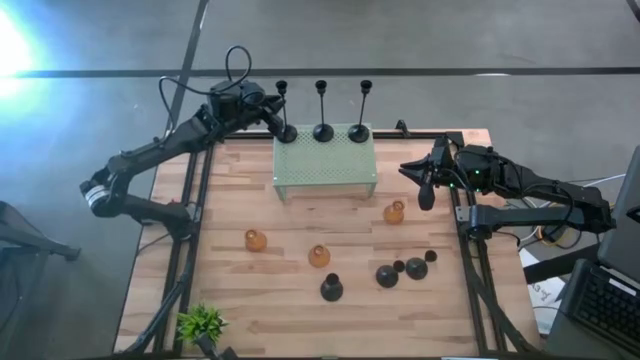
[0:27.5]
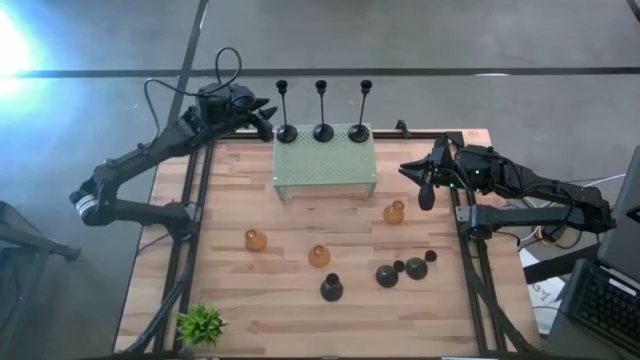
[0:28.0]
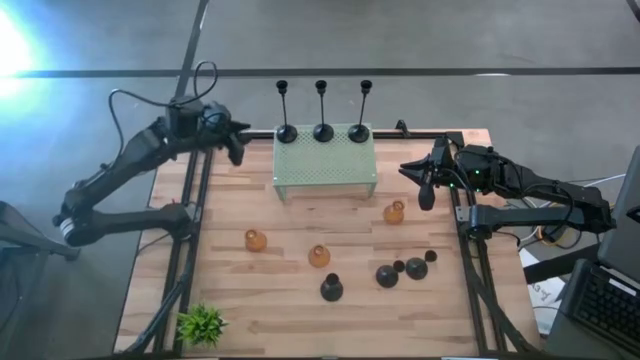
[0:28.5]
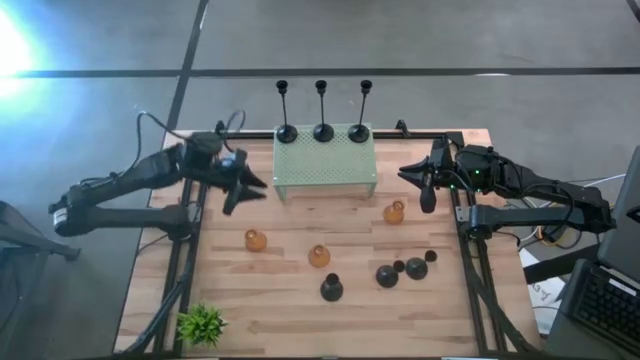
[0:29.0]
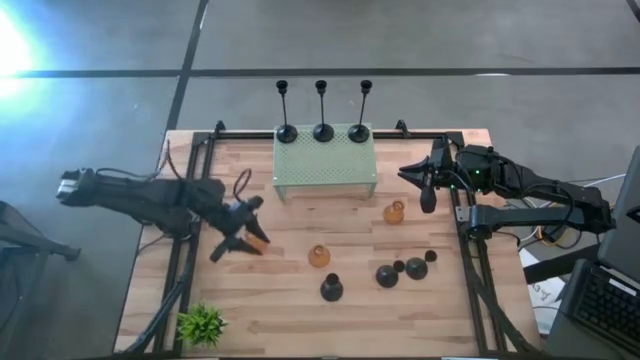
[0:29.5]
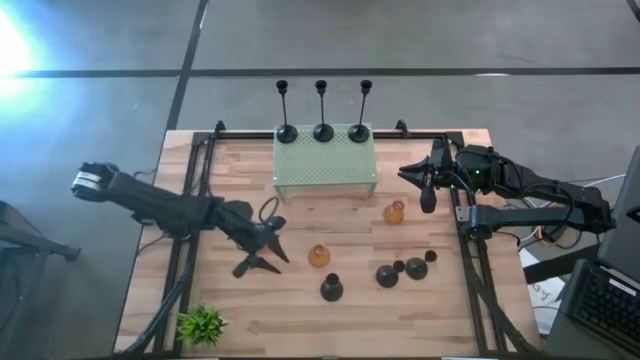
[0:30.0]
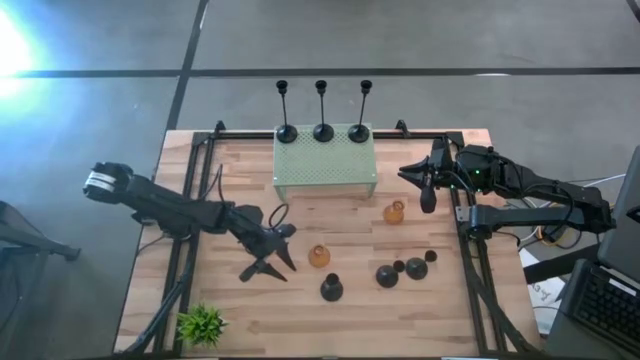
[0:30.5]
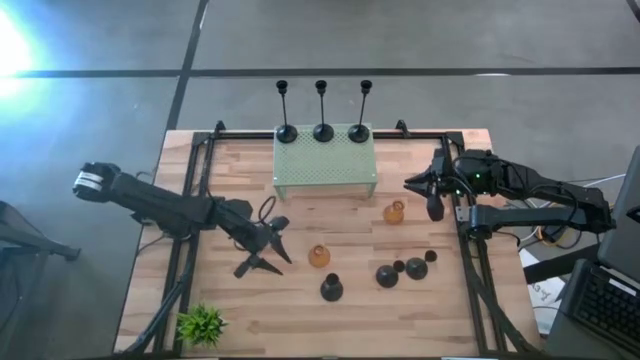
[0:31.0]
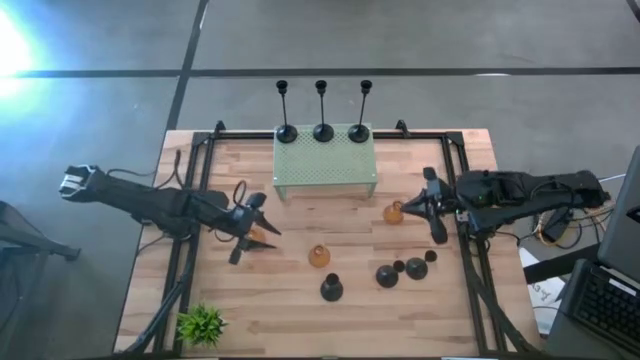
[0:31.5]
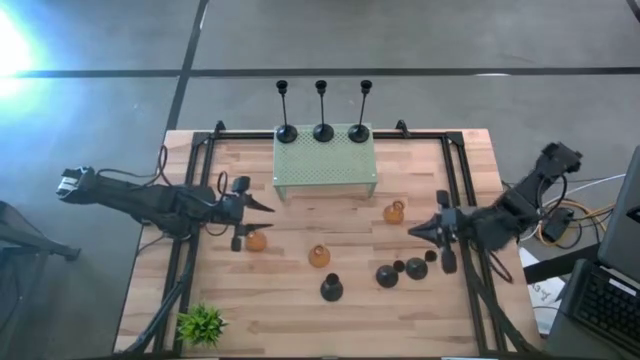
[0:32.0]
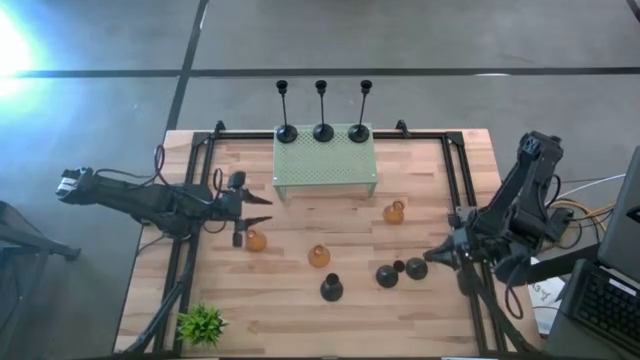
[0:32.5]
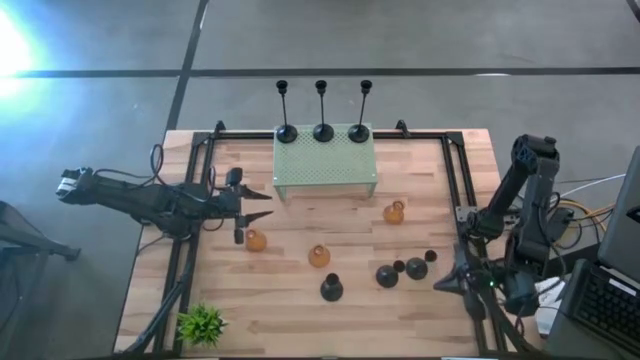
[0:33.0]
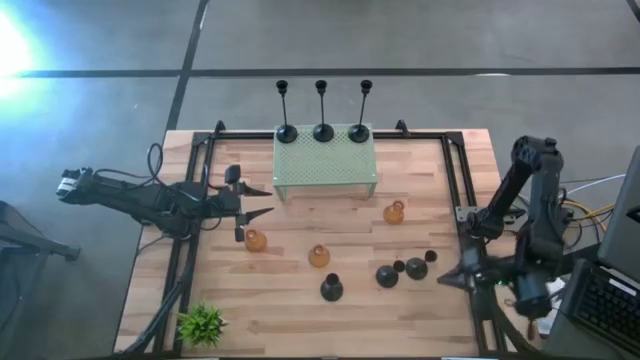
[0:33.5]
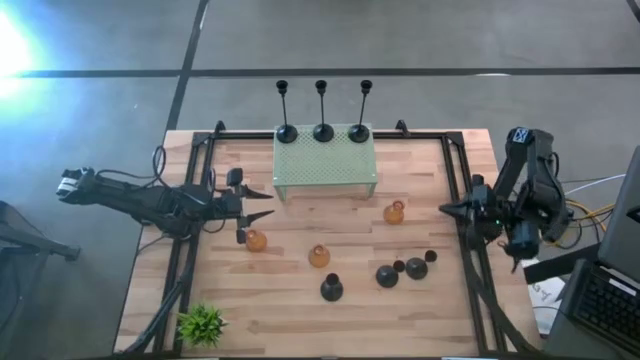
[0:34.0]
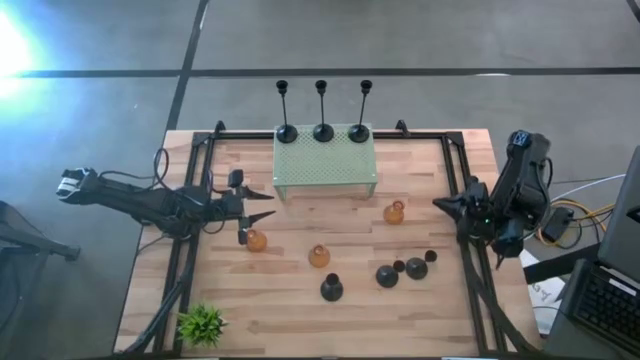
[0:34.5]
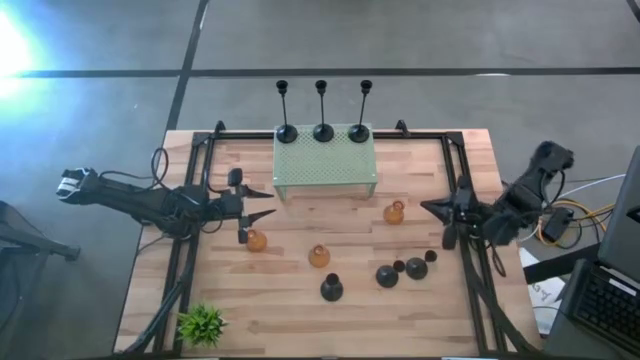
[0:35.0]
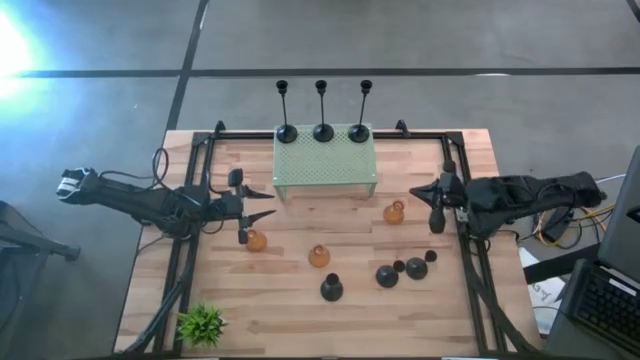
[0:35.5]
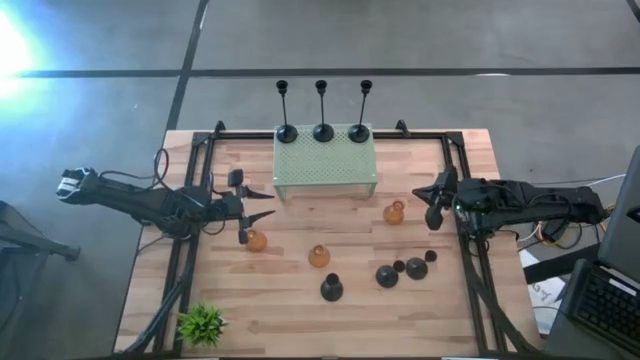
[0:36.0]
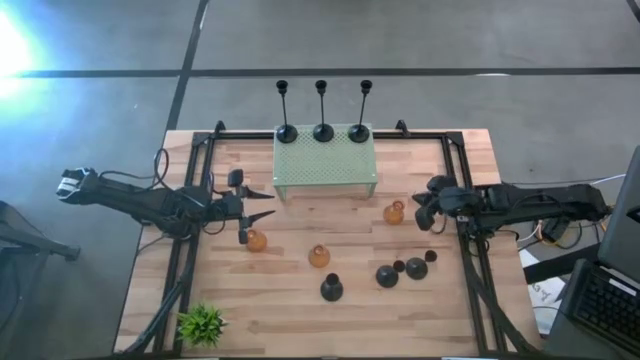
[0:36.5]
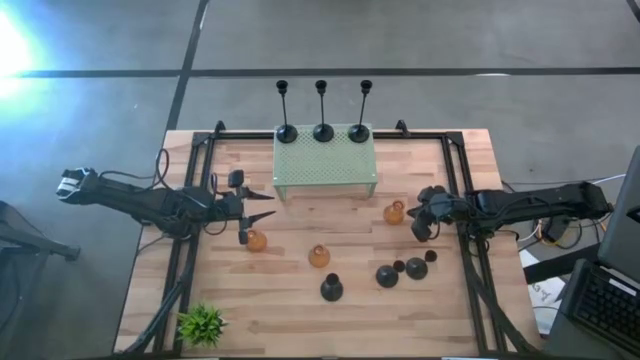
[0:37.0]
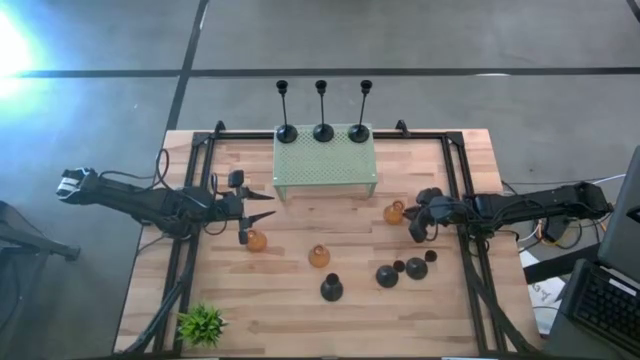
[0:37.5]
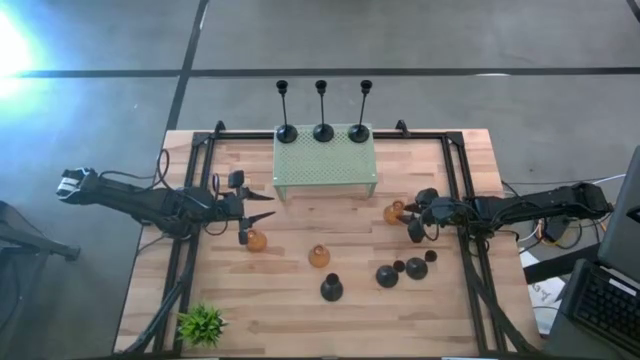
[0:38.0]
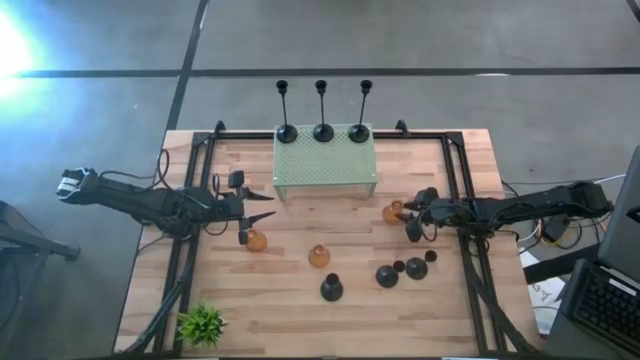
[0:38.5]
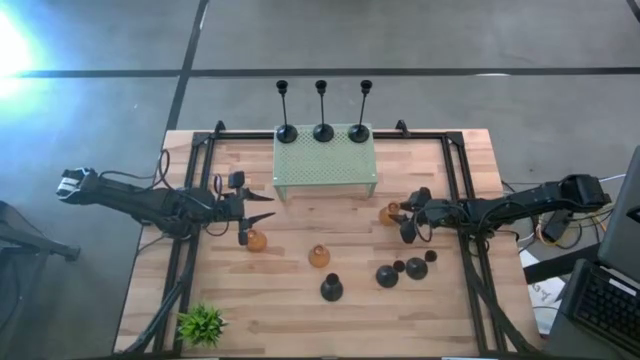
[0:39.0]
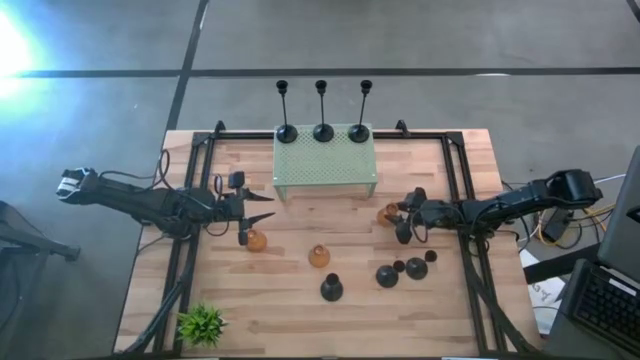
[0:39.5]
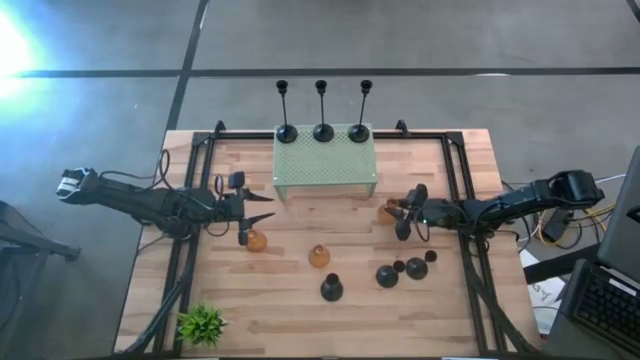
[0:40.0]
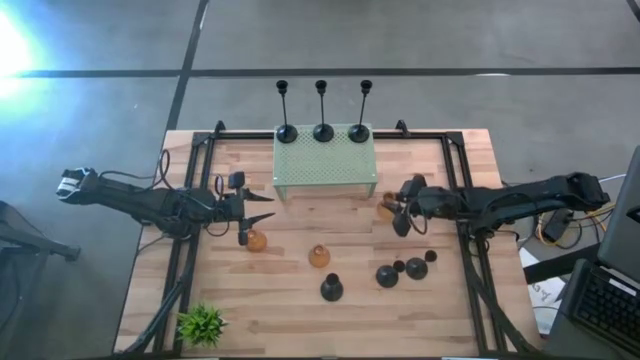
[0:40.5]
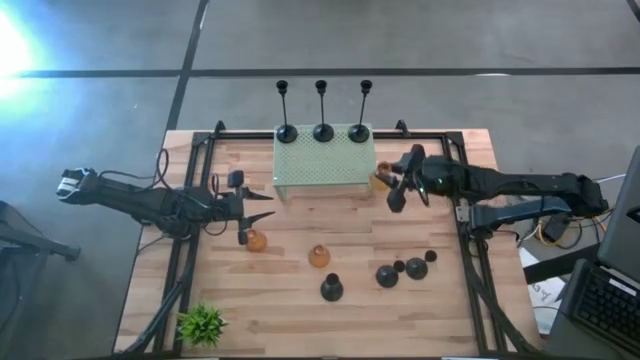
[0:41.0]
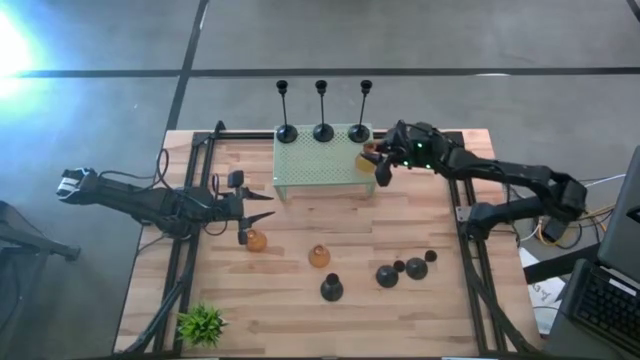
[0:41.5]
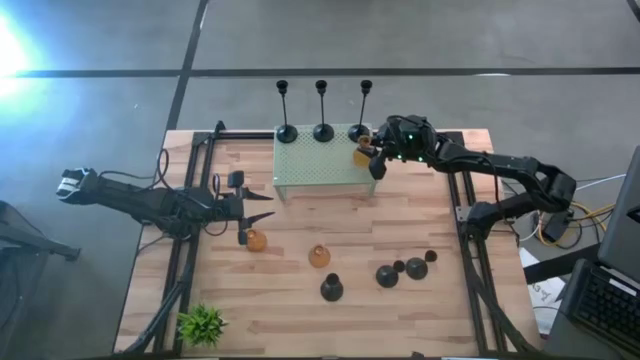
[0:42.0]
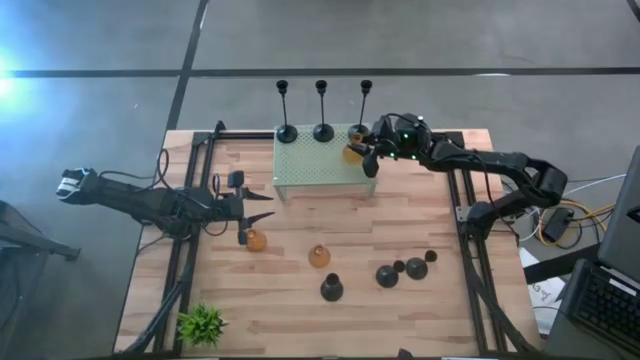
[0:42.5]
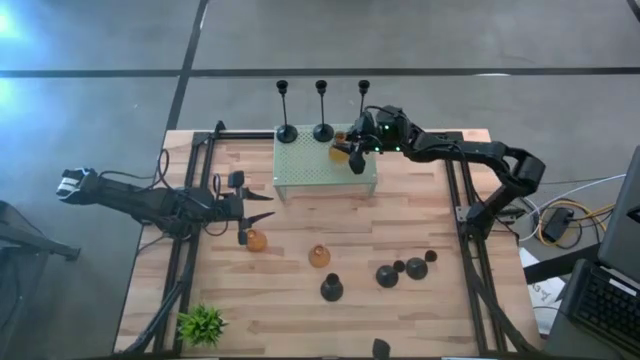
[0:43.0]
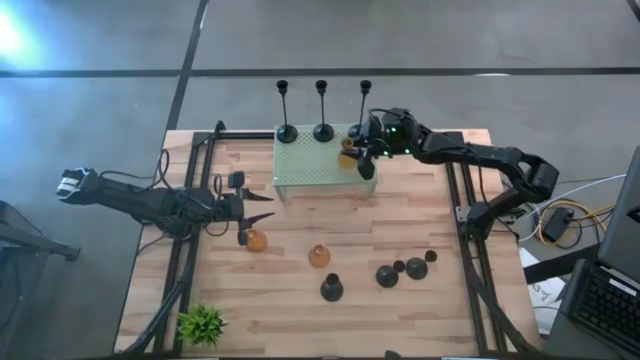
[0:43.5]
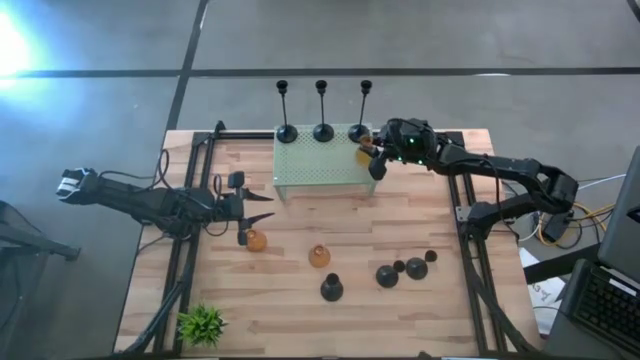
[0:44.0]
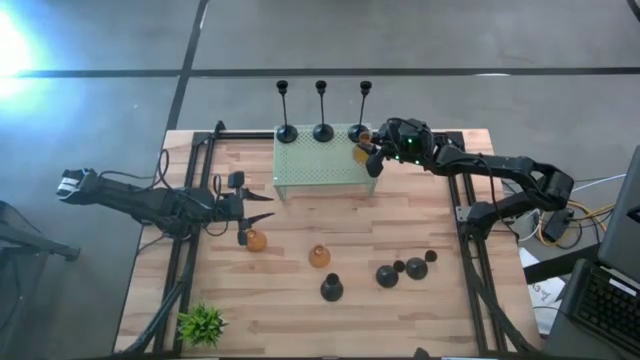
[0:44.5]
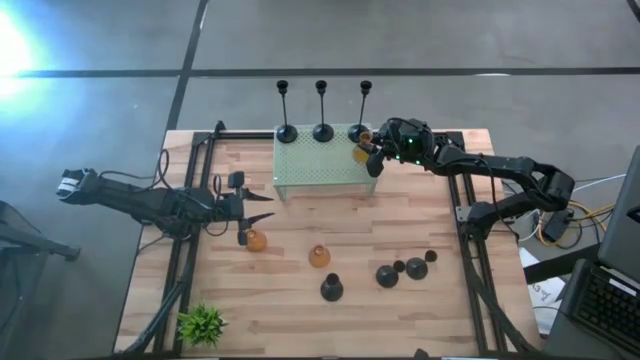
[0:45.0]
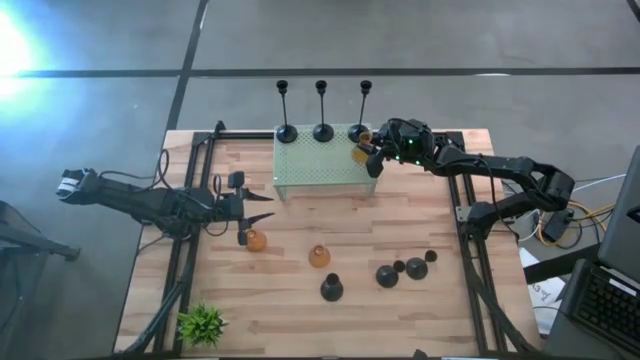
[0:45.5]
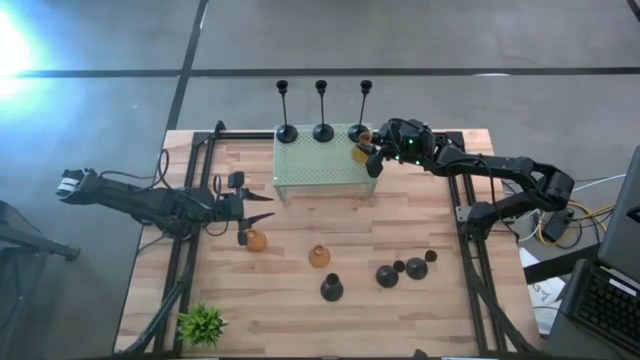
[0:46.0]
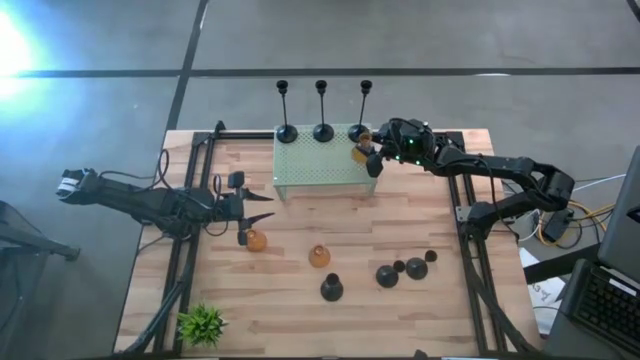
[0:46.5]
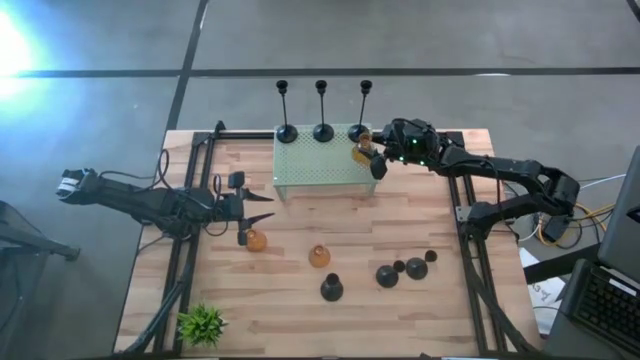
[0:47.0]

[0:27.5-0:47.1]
Task: Pick & Place candle stick holders
Put the yellow glass candle holder on the shelf

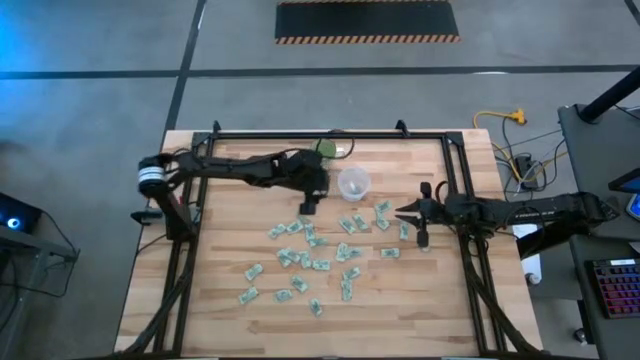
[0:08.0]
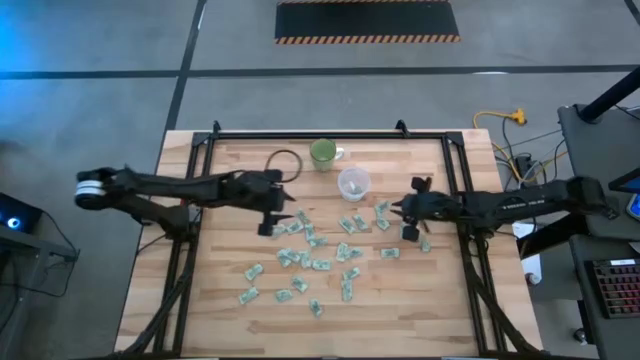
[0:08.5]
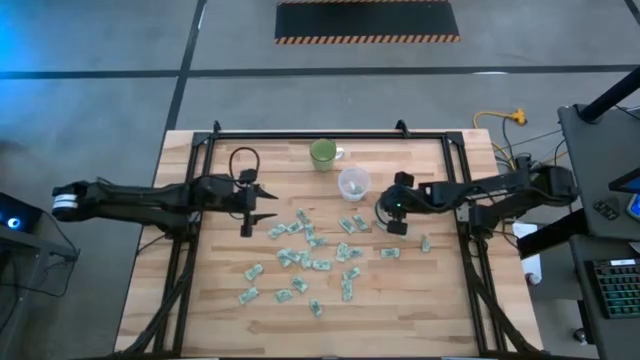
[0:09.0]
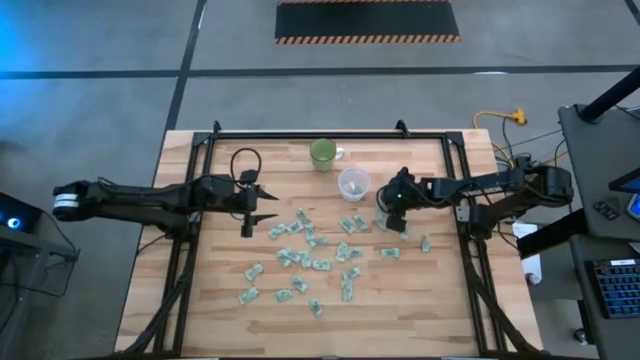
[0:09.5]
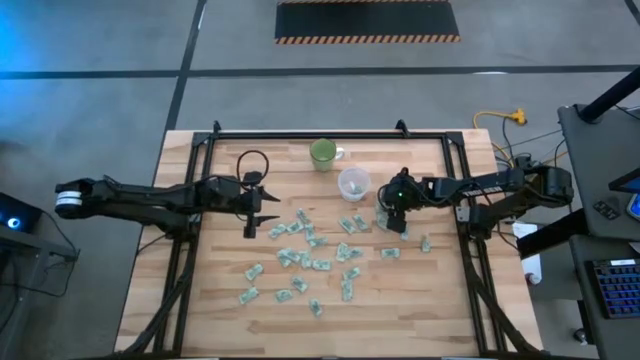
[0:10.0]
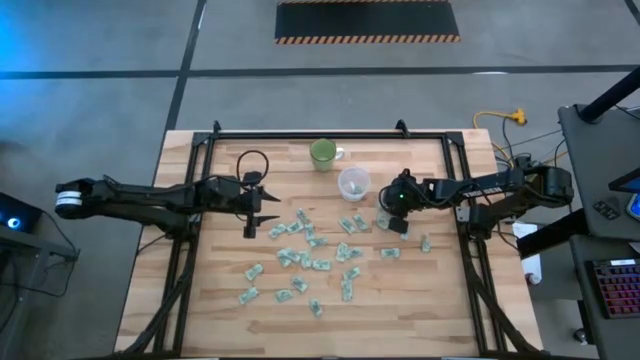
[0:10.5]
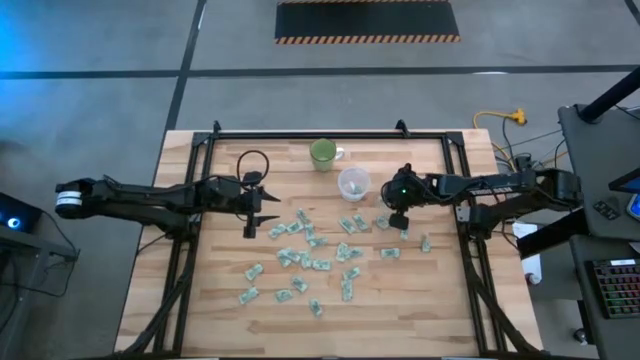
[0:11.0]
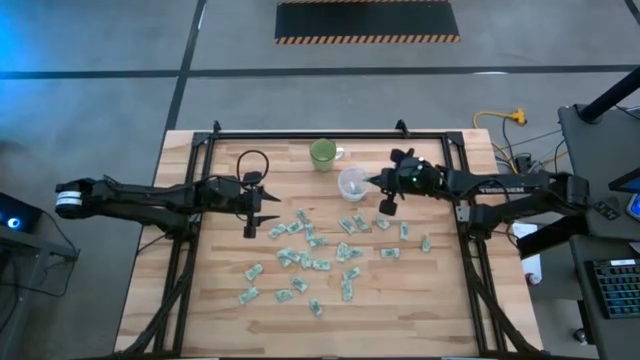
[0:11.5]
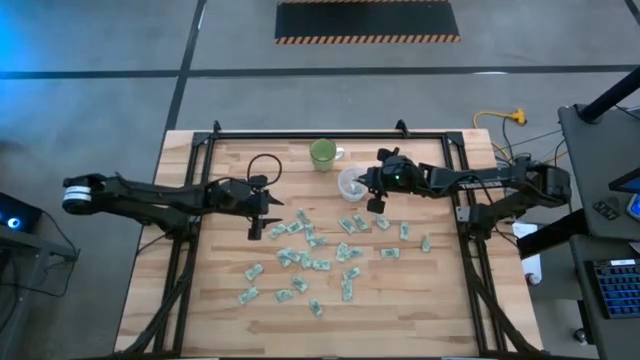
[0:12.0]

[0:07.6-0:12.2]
Task: Pick and place Stevia / Truvia into bins
Put the stevia packet into the transparent container
